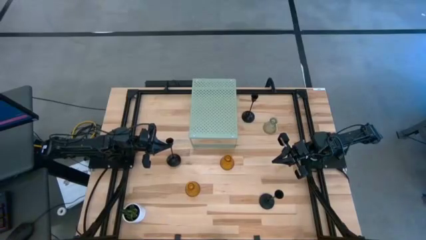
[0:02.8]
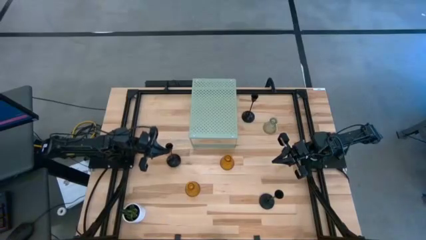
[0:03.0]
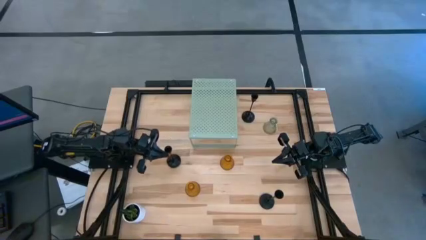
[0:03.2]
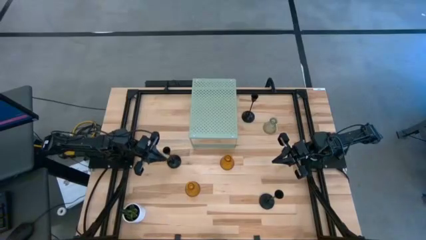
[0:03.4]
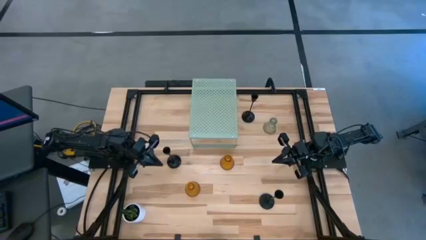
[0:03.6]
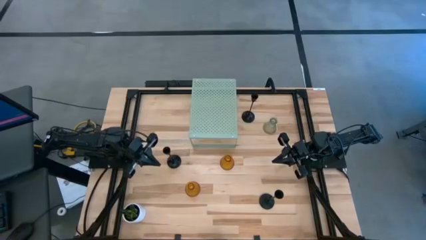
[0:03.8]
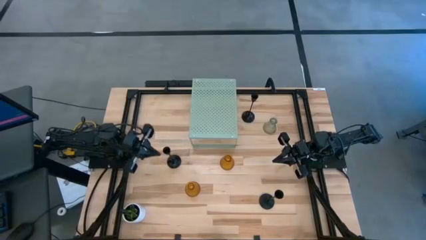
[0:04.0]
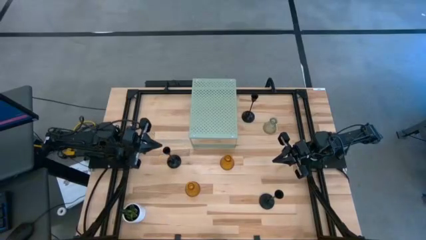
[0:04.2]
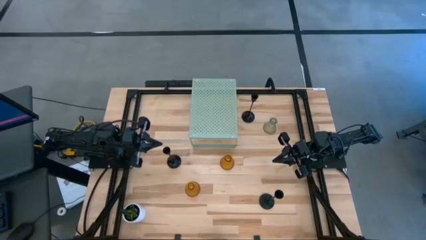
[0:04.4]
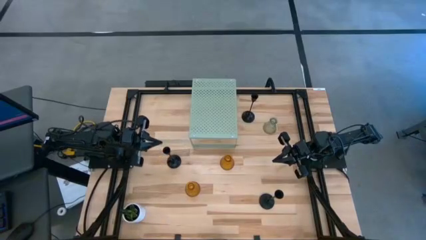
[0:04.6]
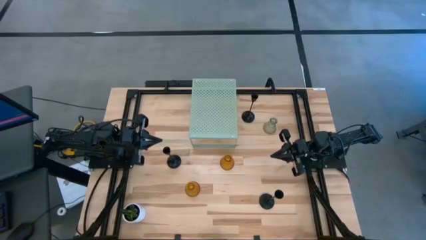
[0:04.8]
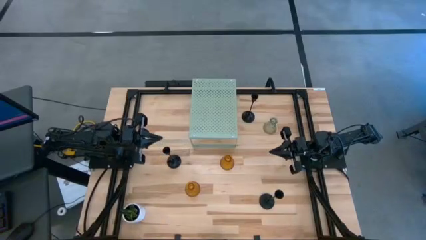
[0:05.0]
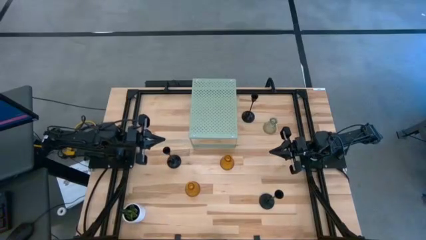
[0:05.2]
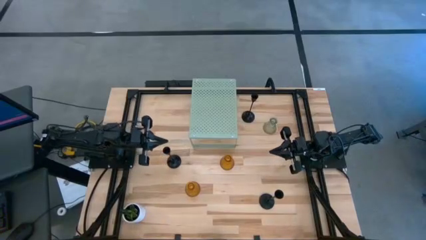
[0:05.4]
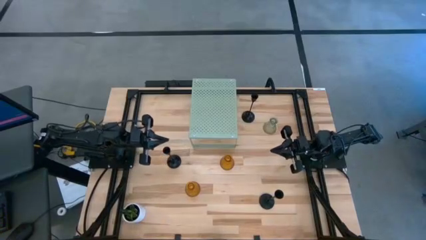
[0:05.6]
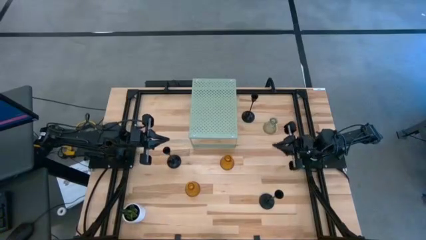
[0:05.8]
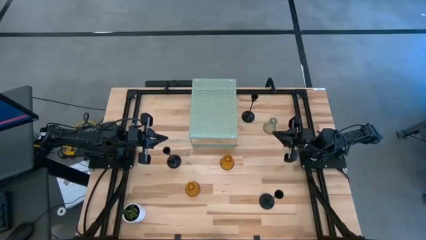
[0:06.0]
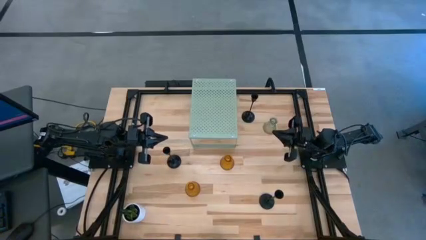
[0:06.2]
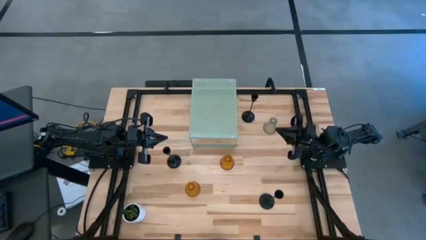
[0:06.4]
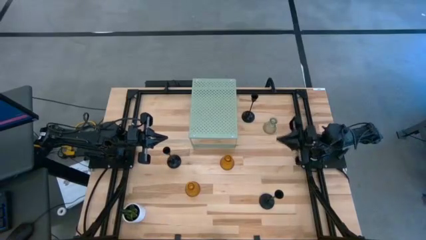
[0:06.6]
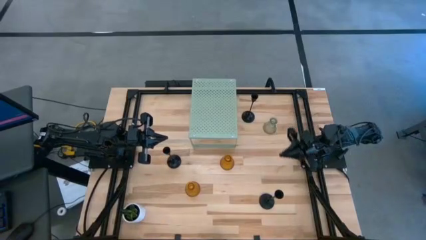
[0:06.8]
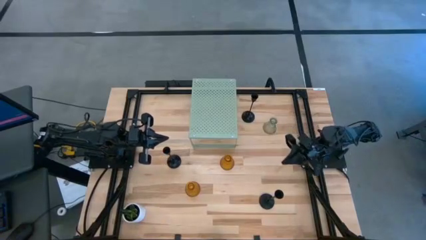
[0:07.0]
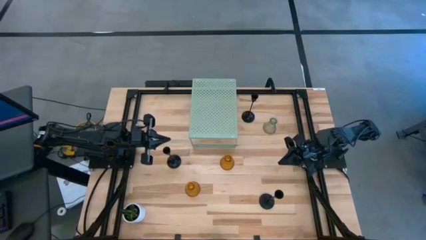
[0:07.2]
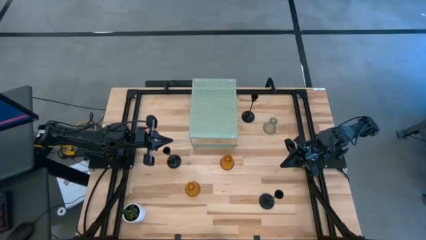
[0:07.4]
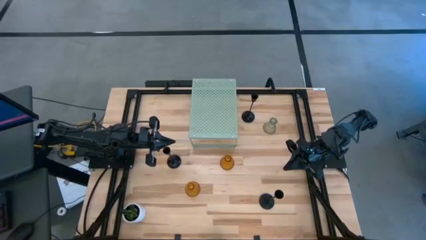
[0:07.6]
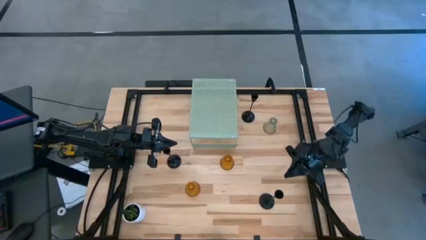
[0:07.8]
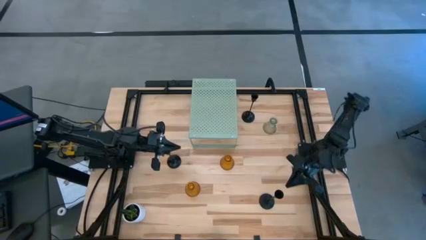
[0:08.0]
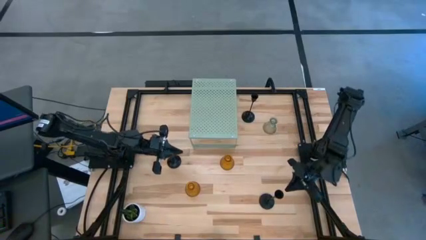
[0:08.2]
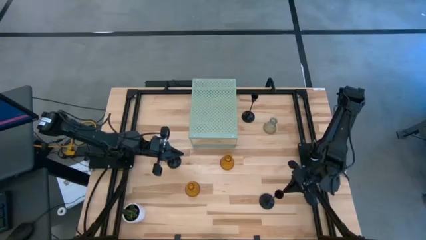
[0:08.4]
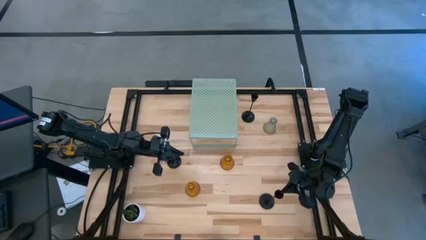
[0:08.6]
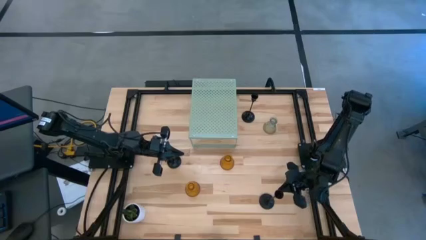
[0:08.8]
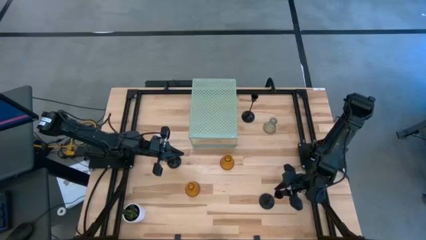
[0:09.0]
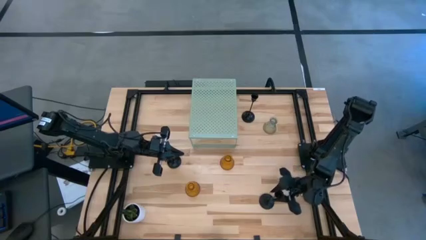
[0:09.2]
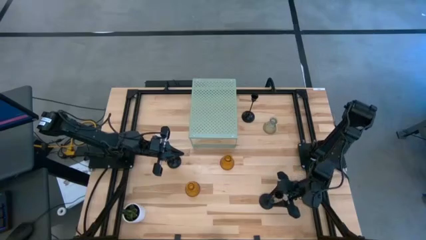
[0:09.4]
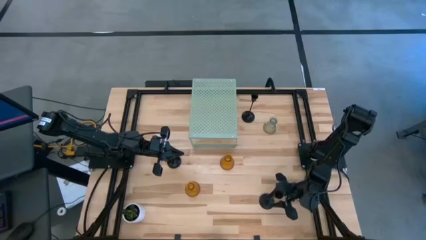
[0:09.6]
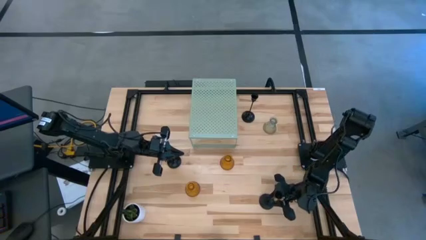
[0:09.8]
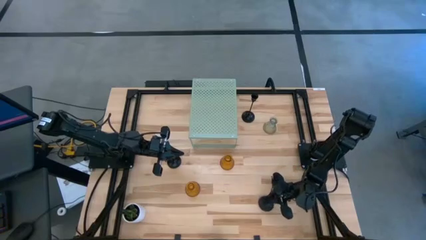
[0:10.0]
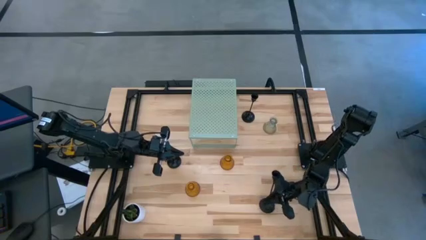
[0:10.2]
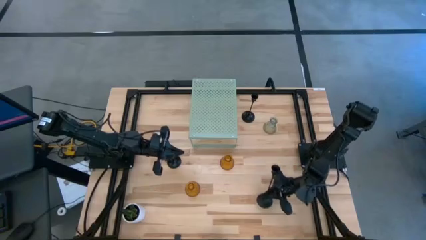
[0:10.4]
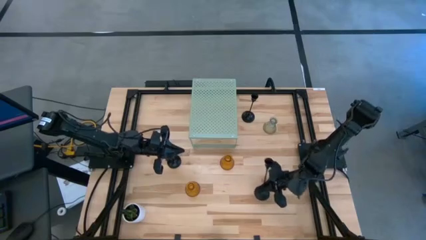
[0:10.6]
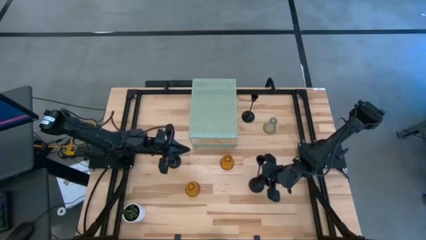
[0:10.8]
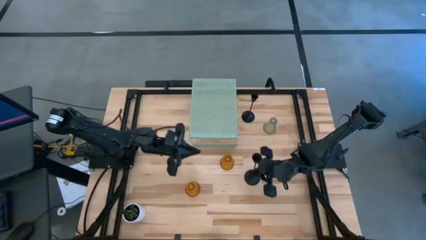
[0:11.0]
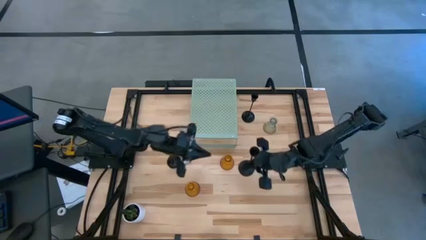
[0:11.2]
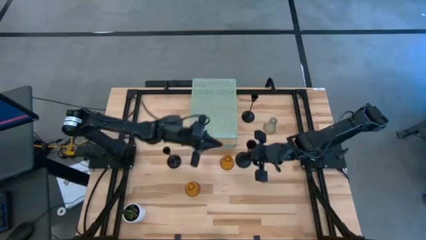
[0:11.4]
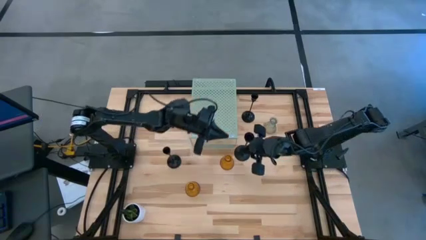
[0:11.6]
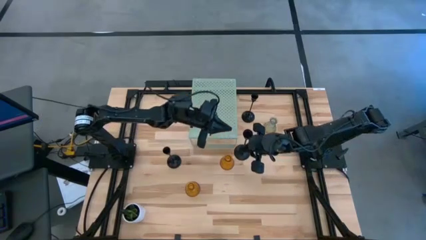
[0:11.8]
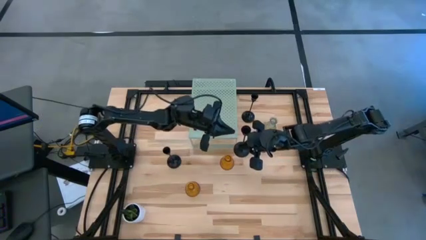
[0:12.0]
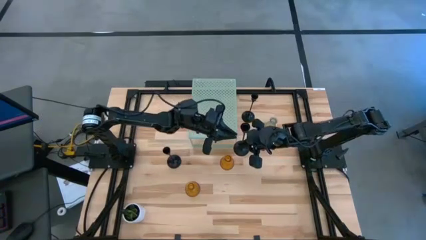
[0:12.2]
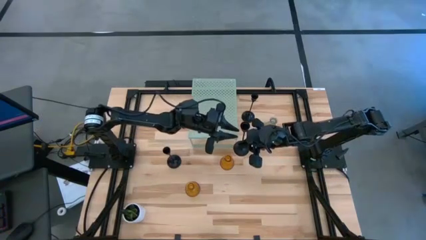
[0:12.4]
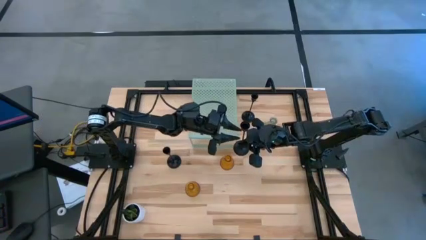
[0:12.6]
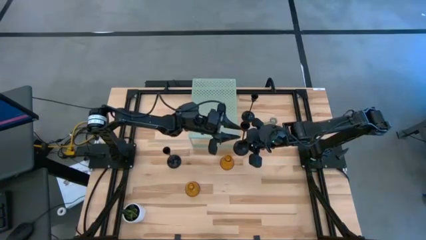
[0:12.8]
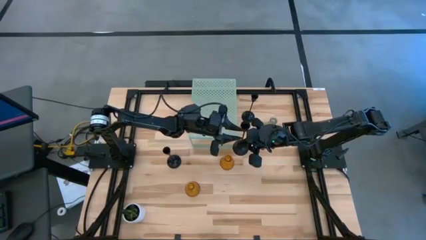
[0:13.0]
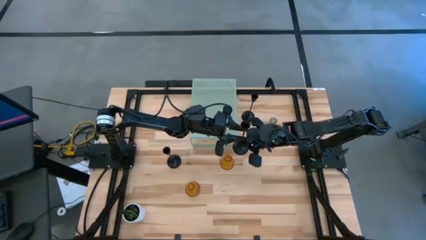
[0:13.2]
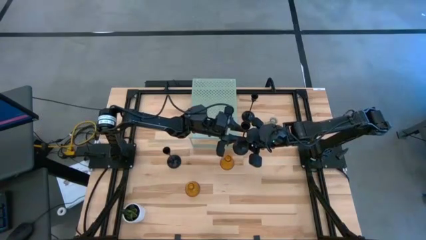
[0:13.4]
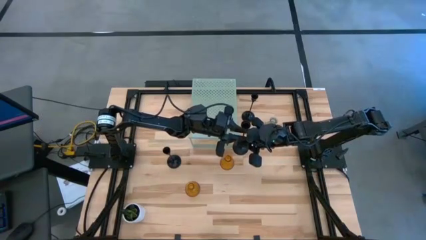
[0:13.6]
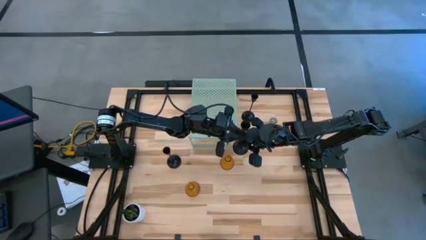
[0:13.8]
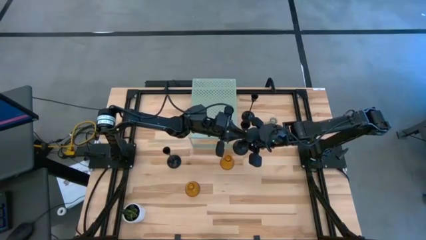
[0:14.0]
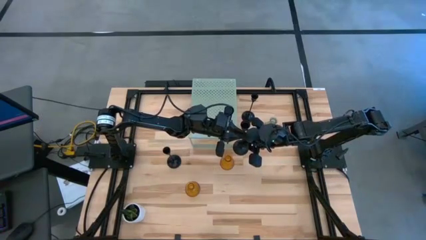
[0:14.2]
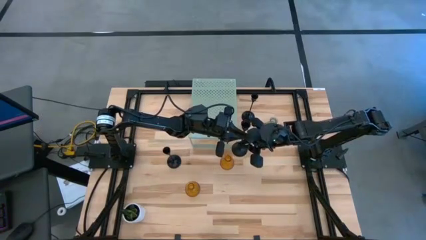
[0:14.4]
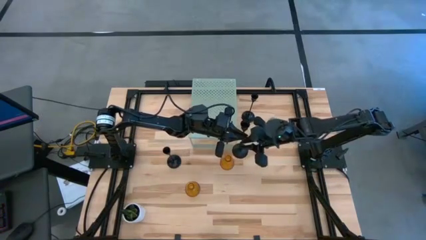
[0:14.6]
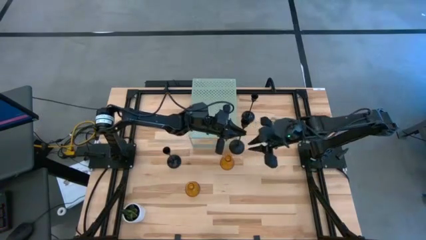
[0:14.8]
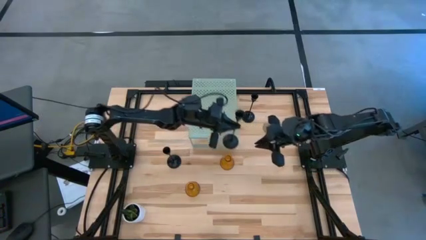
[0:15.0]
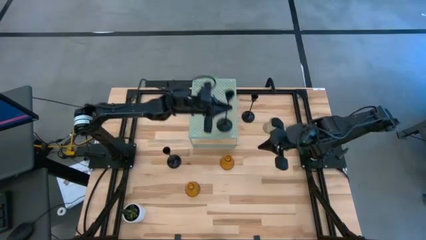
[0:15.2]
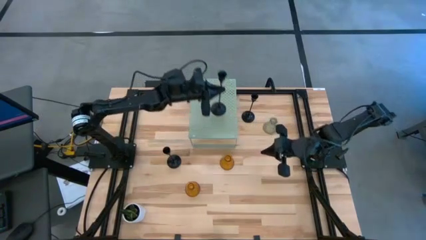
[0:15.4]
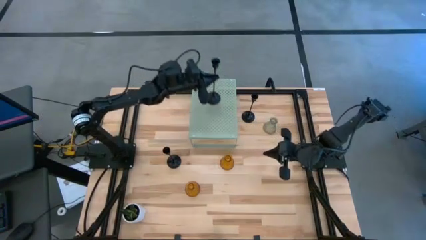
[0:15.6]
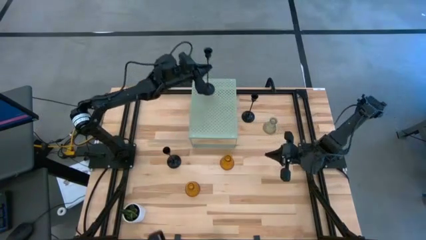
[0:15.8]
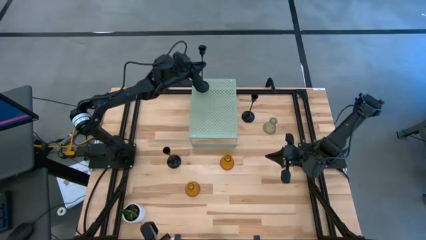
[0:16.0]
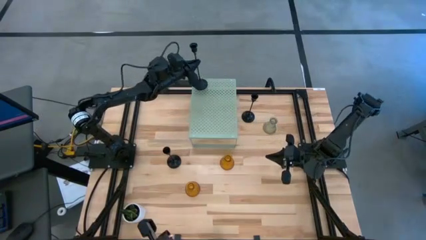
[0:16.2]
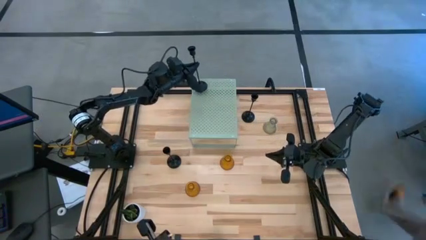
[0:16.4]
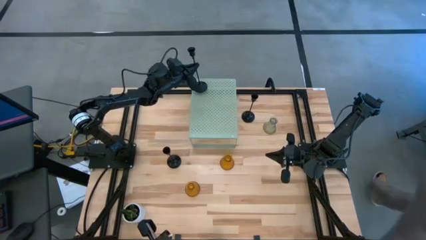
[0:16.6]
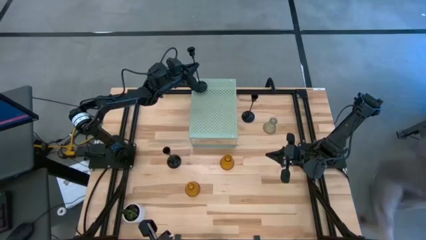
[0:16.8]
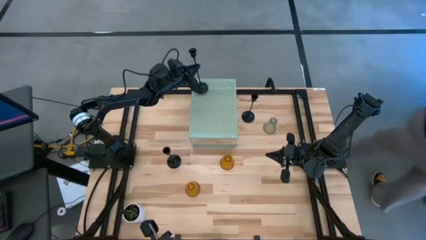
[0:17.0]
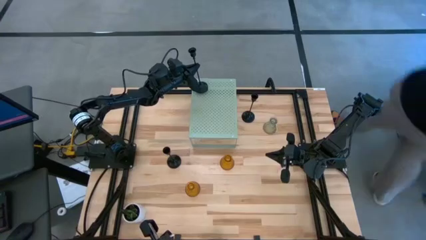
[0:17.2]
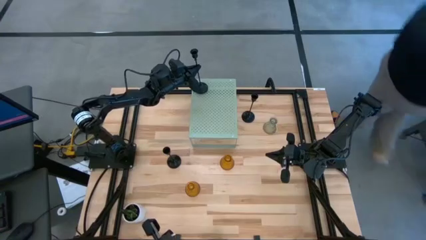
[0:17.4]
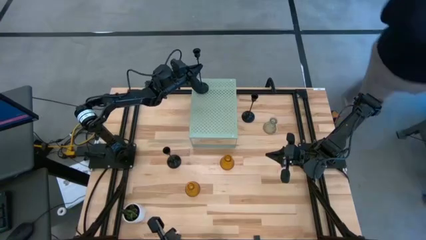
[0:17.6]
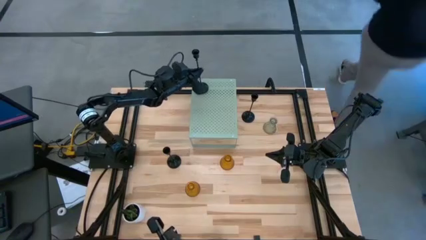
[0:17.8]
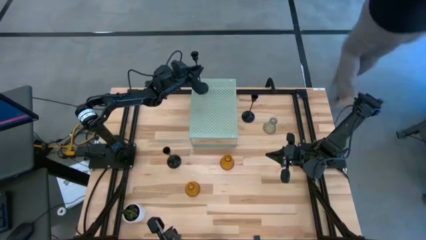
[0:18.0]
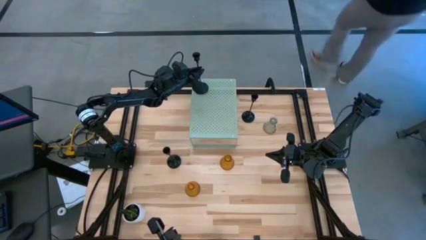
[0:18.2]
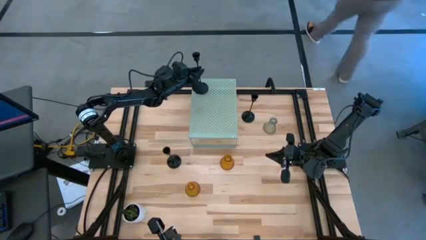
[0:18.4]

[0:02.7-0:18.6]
Task: Pick & Place candle stick holders
Put the bottom black candle holder on the shelf
